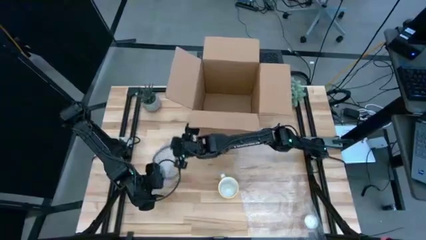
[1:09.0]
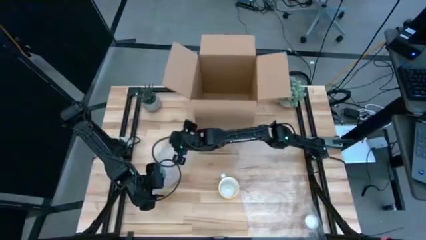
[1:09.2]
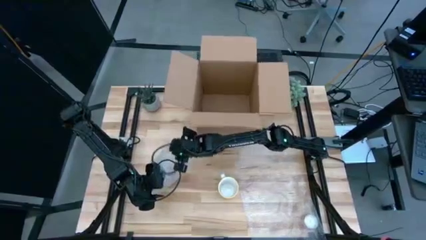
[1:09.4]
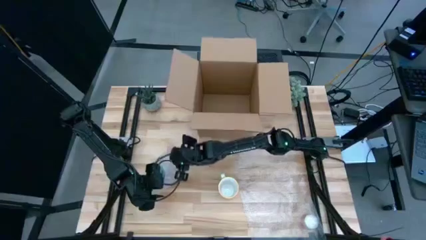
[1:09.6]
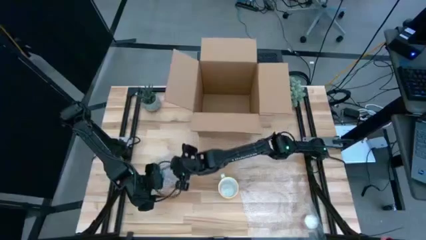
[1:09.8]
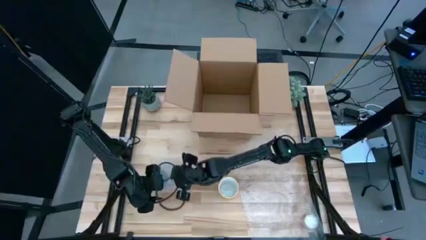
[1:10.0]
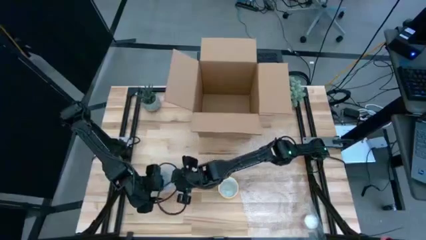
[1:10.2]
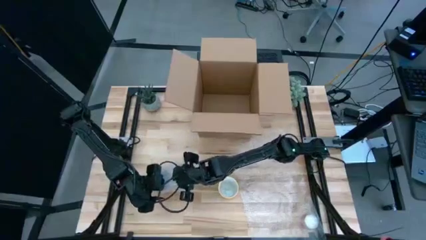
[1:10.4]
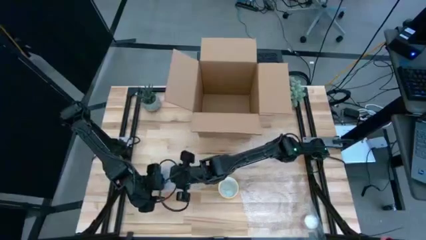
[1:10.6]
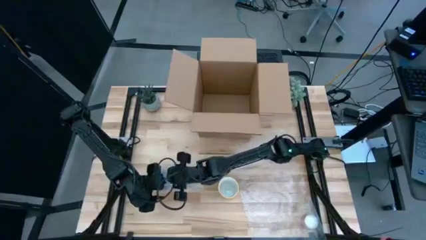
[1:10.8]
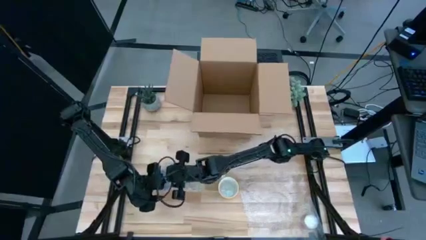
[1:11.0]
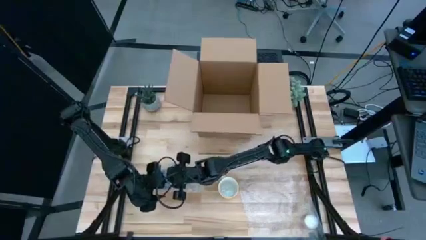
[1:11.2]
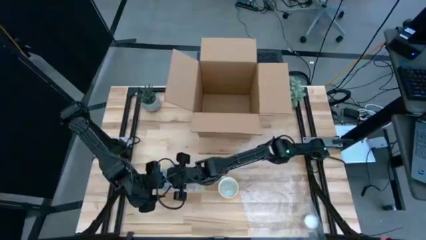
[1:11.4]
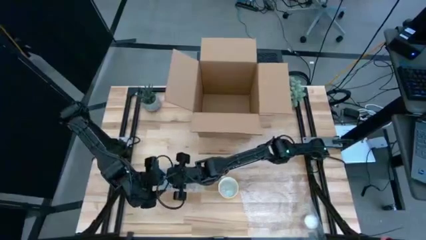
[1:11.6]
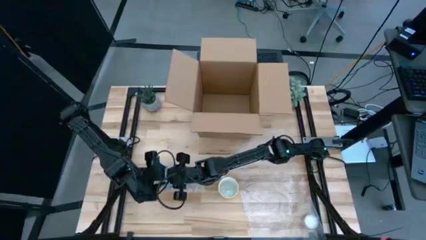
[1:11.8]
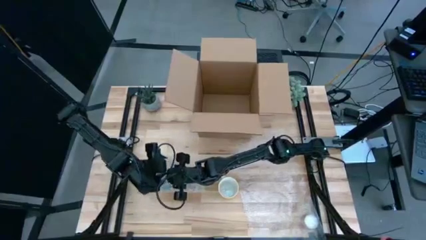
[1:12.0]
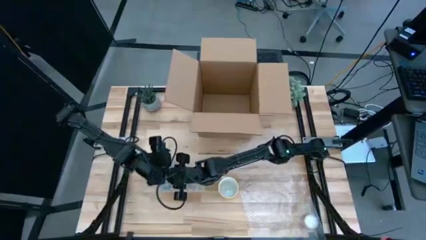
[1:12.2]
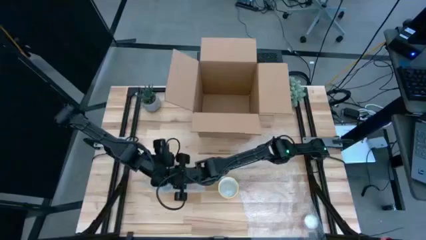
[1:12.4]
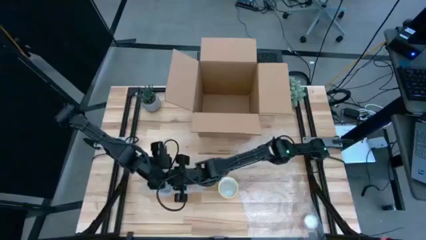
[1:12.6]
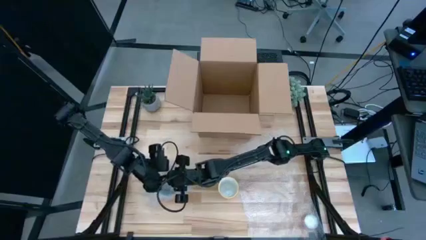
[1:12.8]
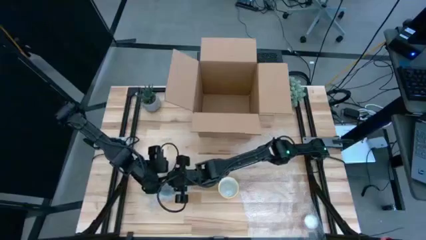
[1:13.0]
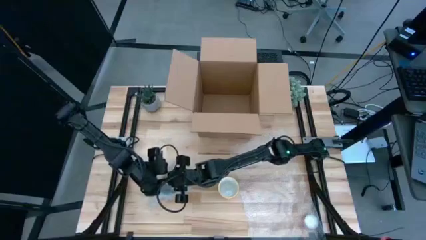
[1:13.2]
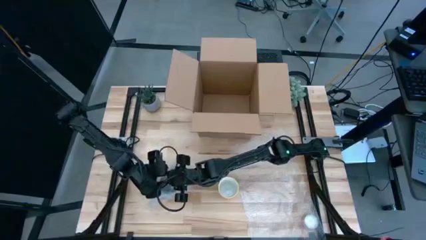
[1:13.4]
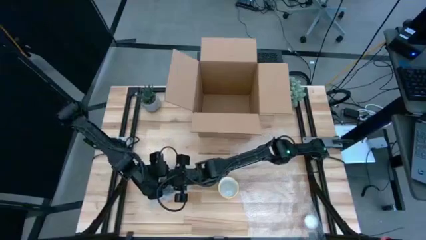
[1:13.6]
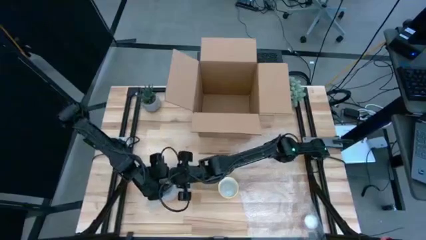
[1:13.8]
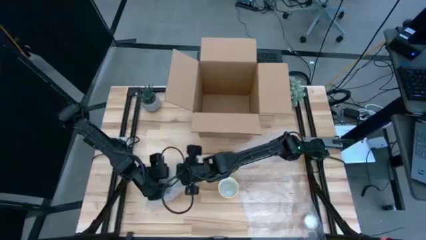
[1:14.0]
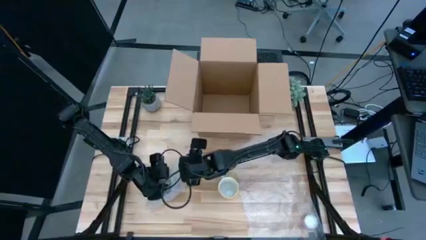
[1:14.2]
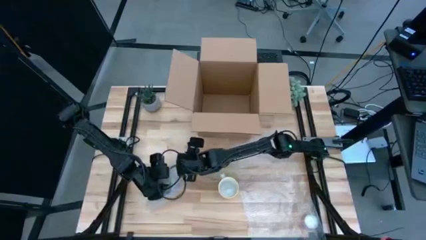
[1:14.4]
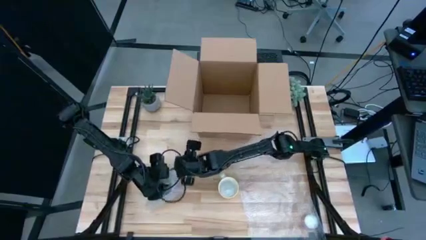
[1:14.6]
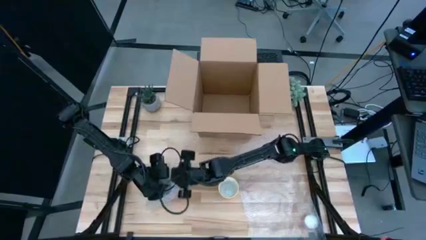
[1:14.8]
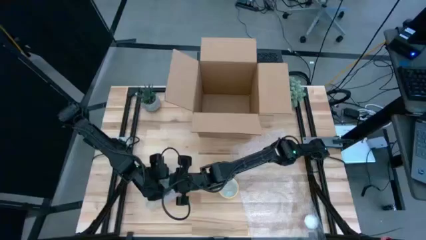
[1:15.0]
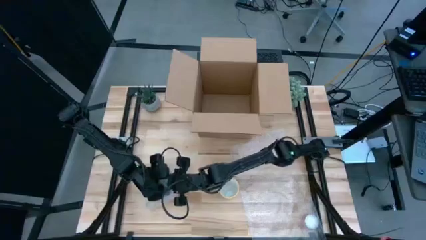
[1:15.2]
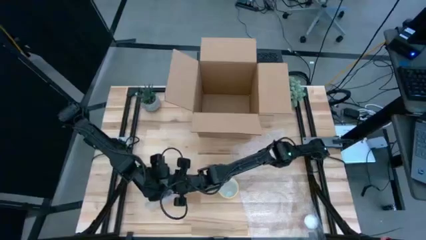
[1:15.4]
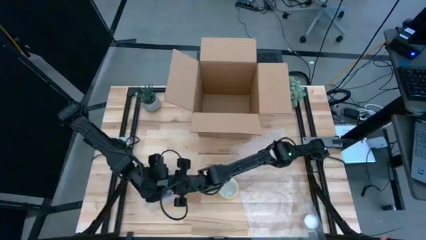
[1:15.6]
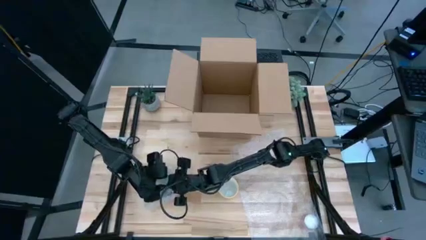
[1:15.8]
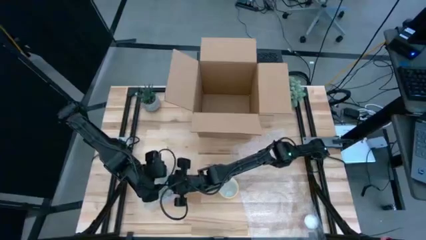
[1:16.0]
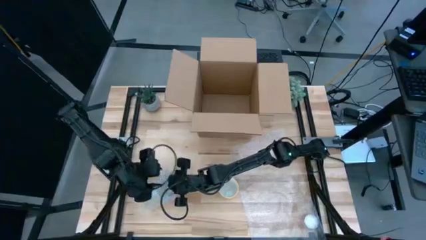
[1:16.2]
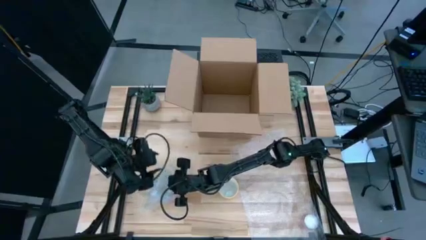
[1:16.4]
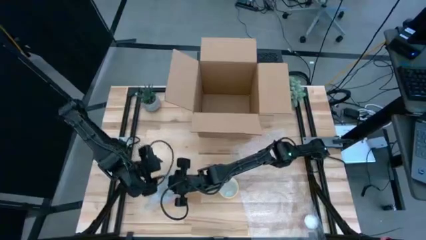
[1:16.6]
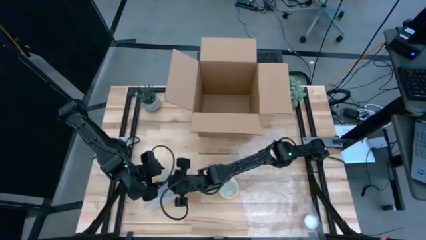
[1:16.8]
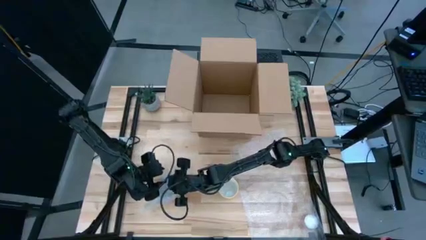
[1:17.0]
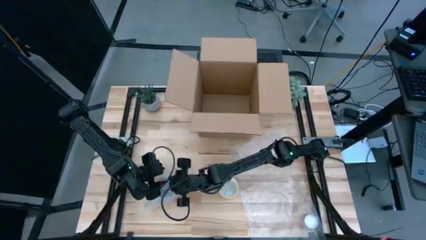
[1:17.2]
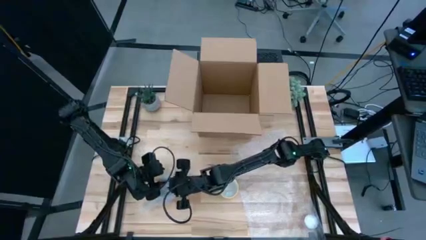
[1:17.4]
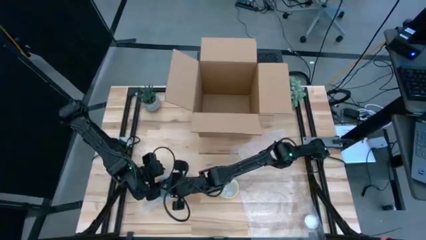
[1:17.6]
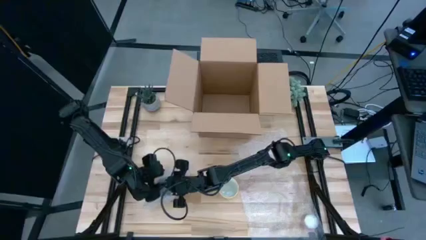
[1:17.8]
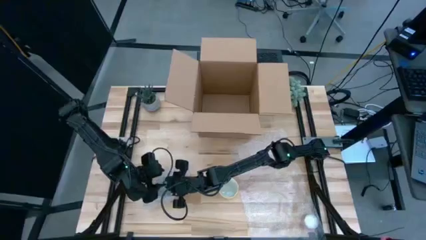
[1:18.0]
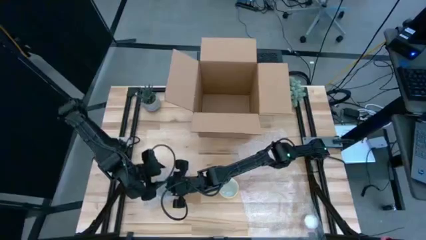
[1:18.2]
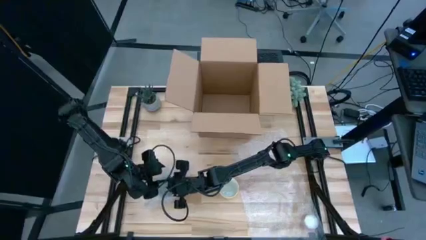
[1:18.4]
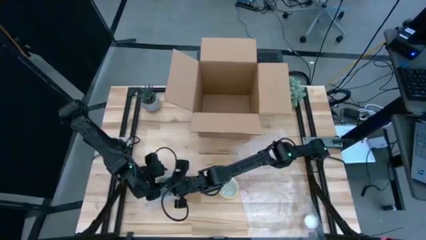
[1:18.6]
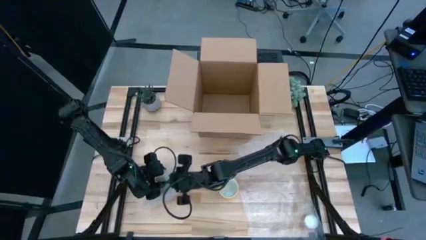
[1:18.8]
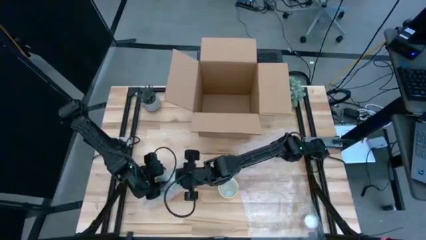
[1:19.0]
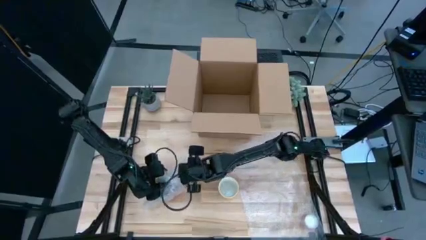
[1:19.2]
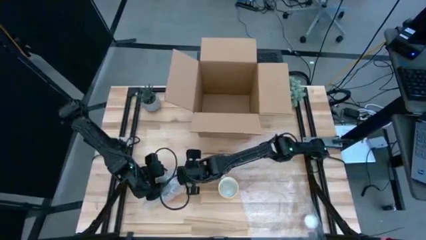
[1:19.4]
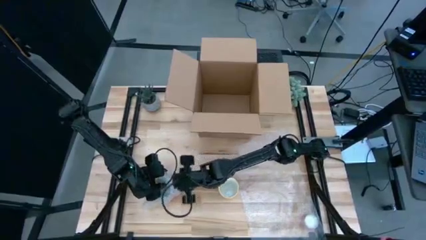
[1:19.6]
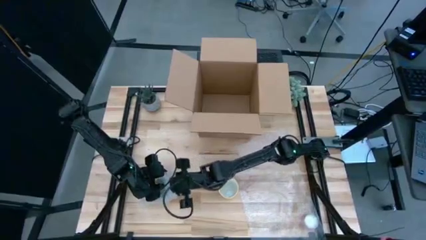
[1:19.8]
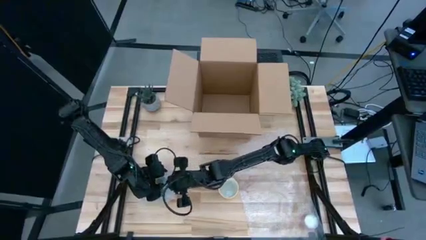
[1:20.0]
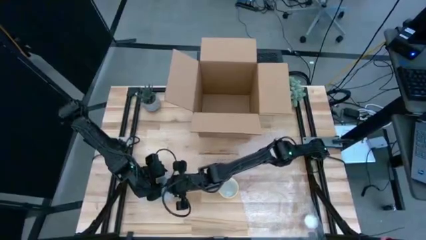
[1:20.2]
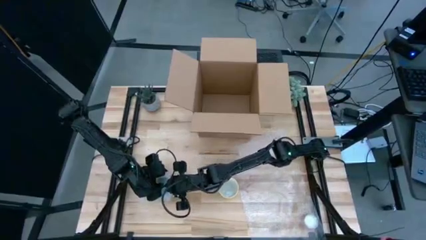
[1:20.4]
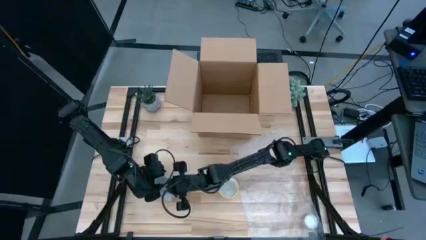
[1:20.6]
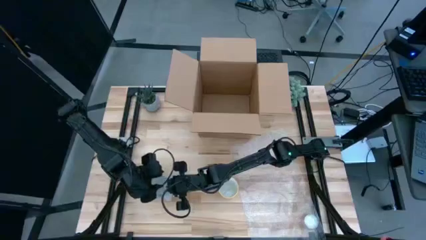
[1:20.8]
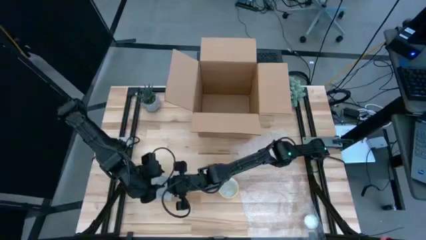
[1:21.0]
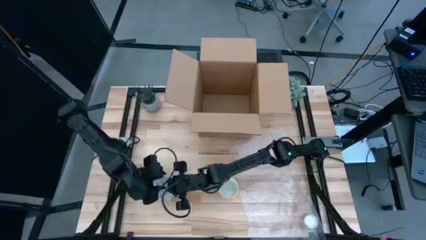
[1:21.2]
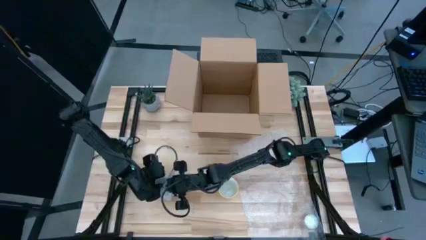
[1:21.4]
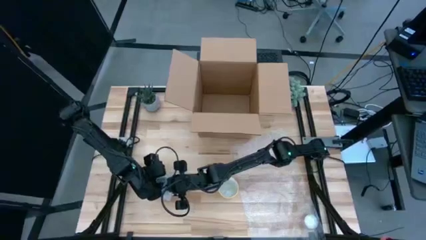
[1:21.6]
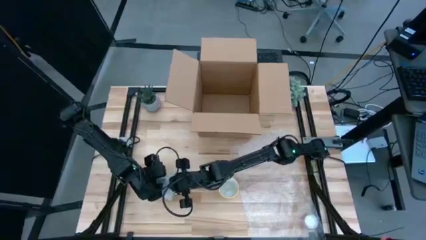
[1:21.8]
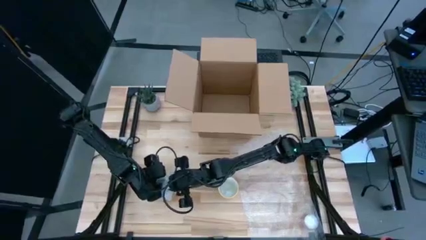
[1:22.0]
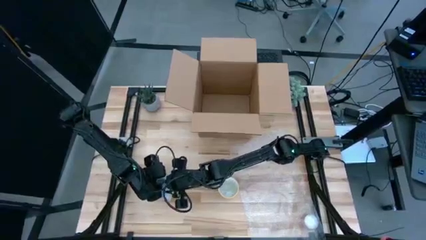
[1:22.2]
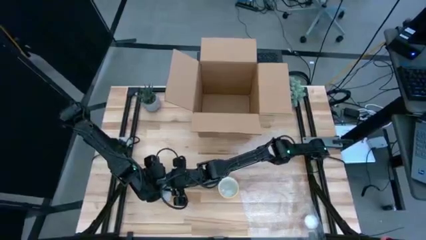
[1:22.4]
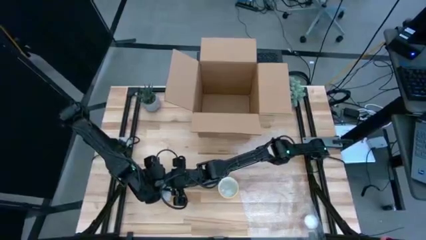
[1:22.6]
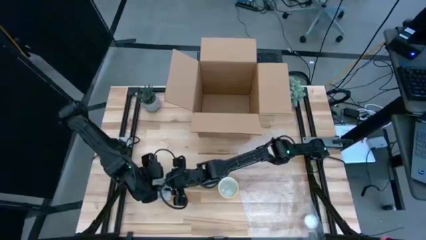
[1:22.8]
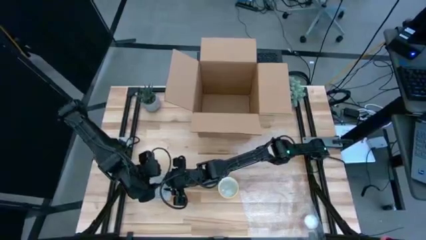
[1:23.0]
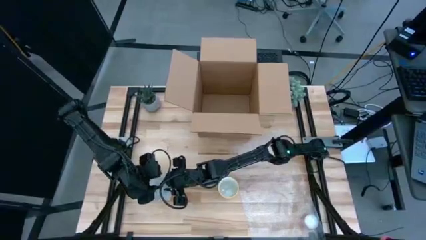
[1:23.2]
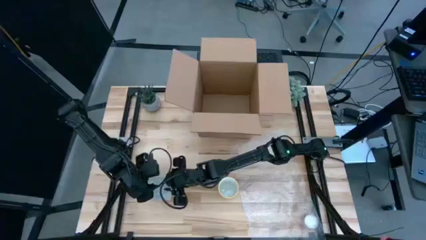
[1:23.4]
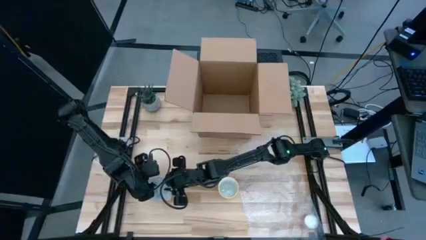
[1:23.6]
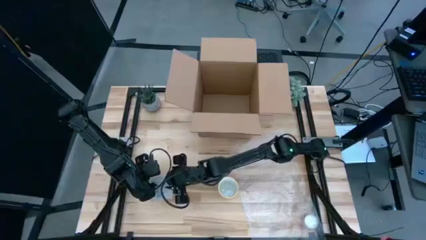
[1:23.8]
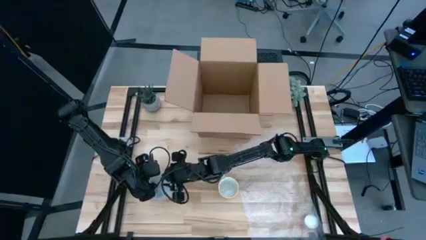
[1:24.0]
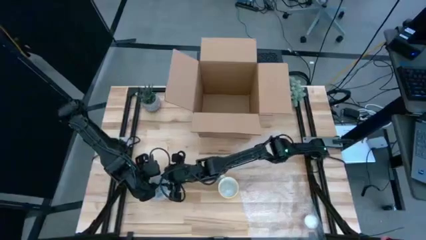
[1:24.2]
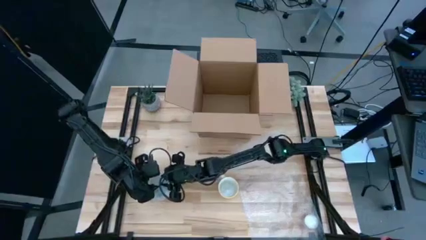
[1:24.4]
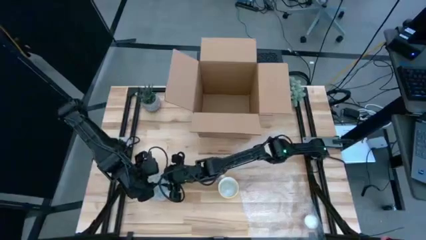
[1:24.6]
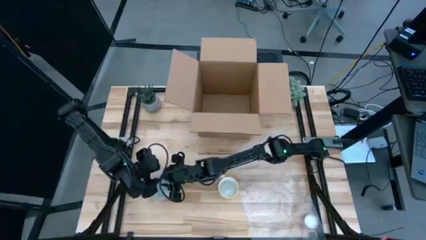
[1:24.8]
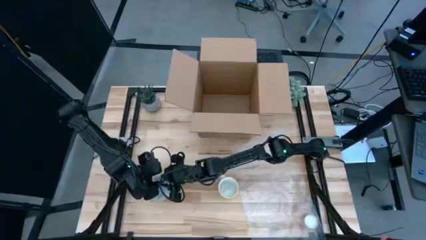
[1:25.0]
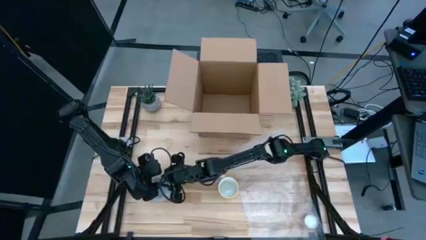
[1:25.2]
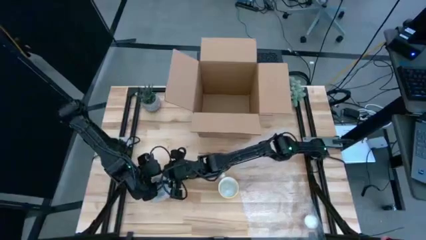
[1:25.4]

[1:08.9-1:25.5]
Task: wrap mug
Wrap the red mug with the bubble wrap
